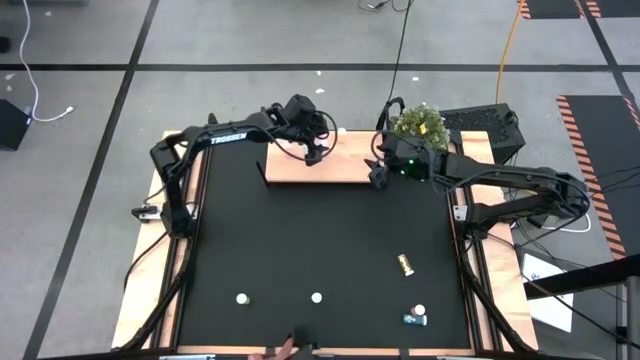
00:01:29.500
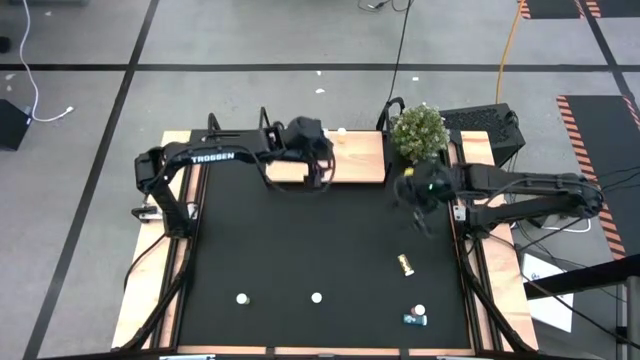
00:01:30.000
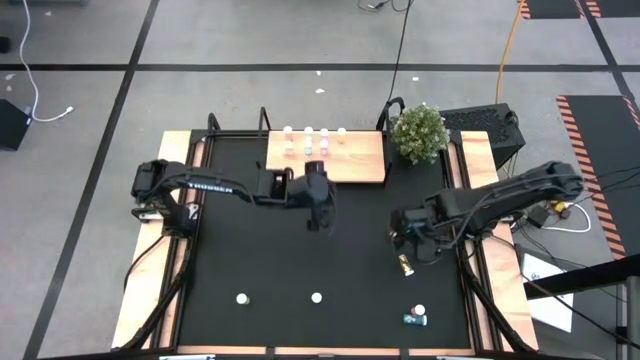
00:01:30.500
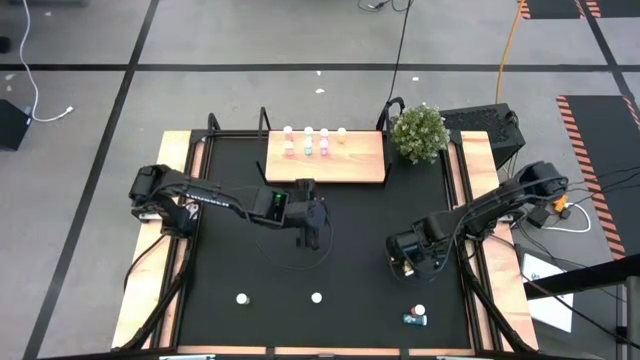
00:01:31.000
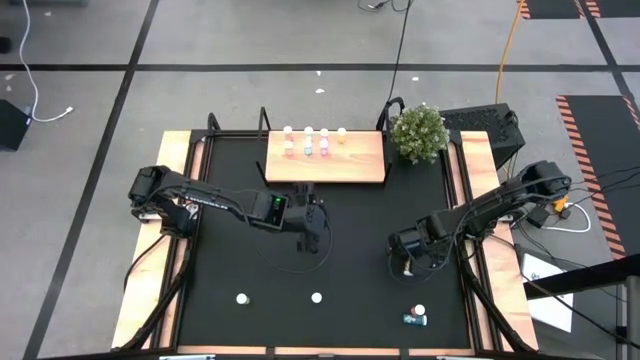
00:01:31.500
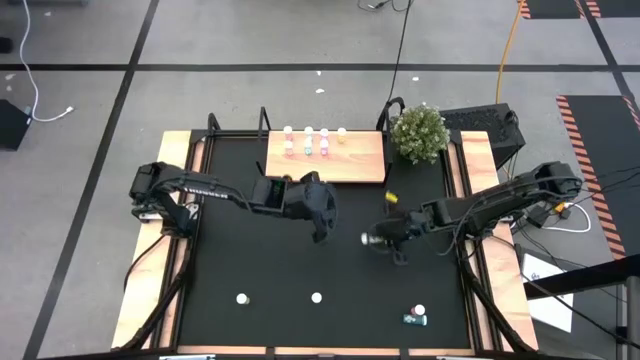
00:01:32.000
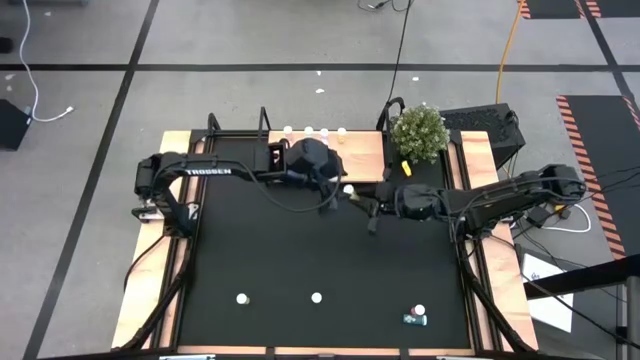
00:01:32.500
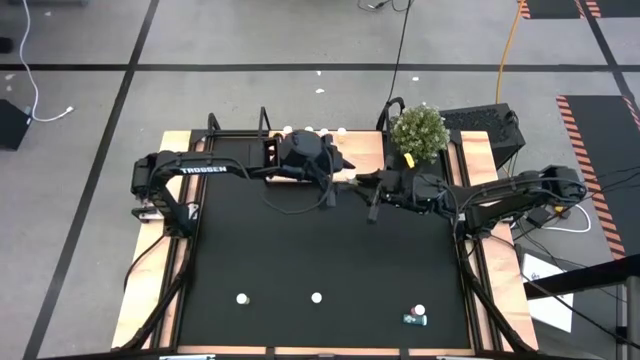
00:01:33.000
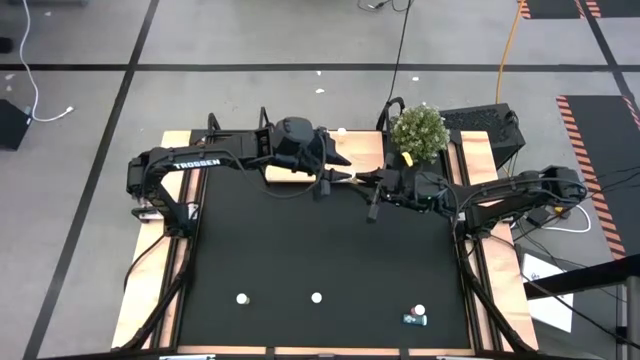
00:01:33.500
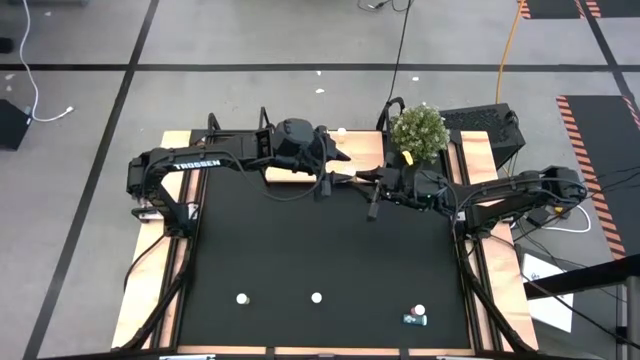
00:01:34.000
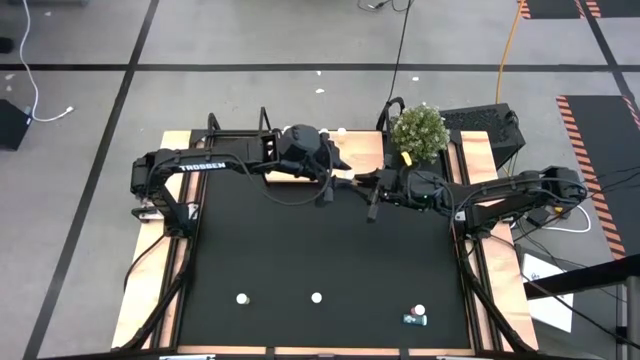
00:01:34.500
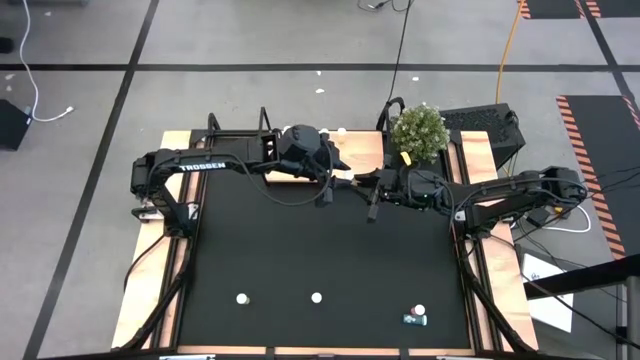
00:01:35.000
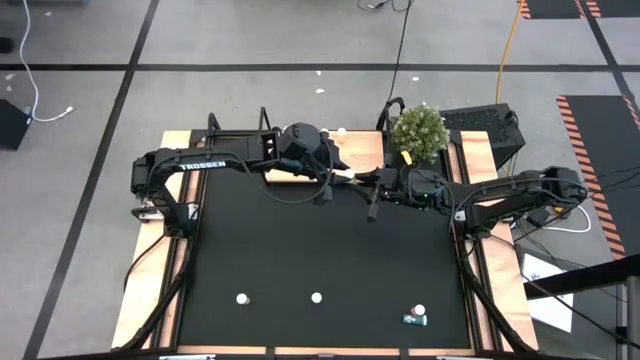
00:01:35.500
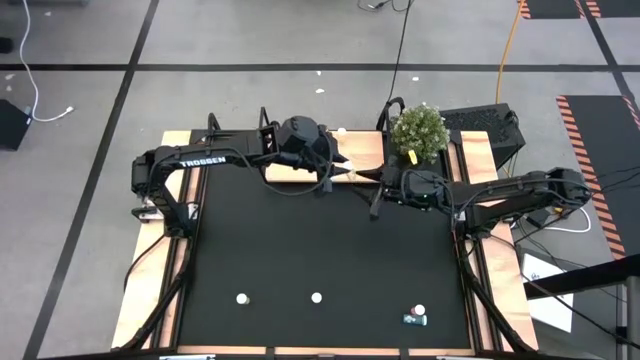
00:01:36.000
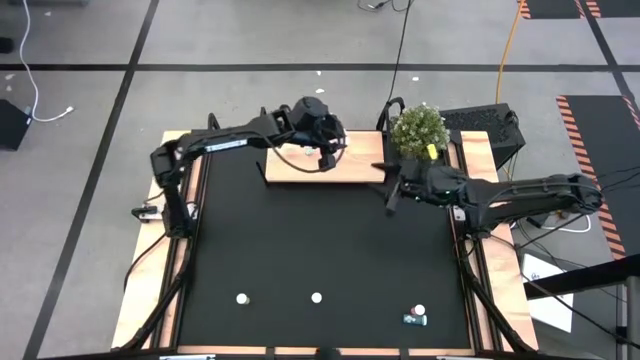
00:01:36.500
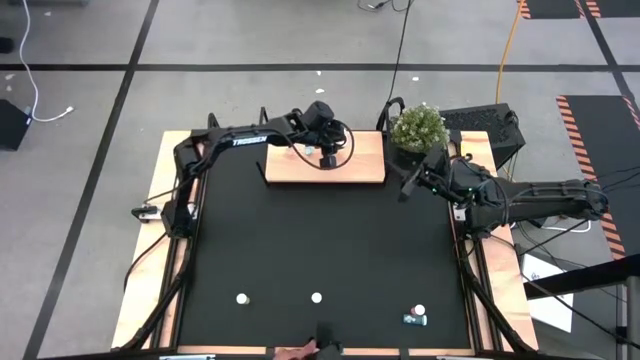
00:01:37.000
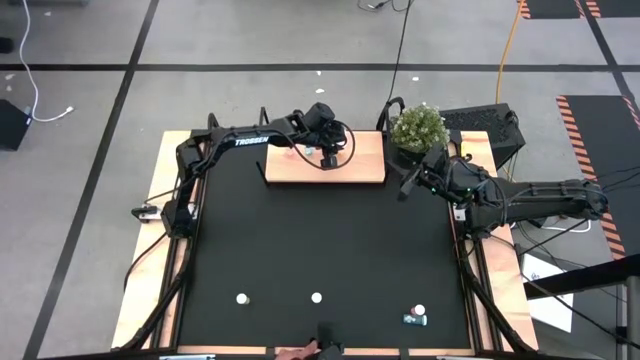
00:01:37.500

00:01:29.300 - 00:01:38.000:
Task: Pick and place medicine bottles onto shelf by color
Put the top yellow pill bottle on the shelf aligned with the other yellow pill bottle

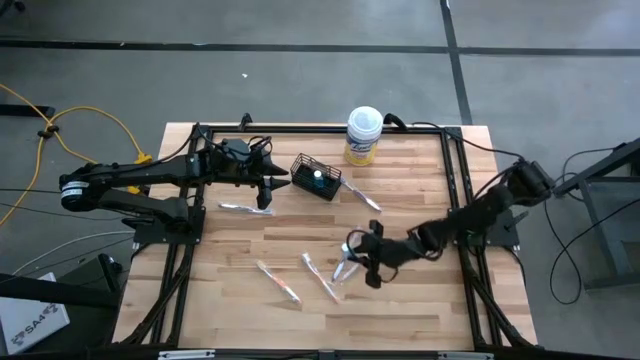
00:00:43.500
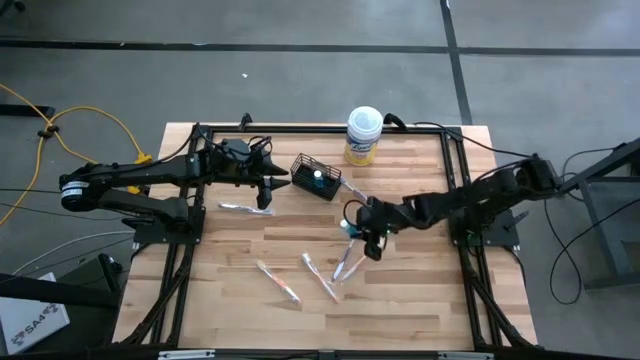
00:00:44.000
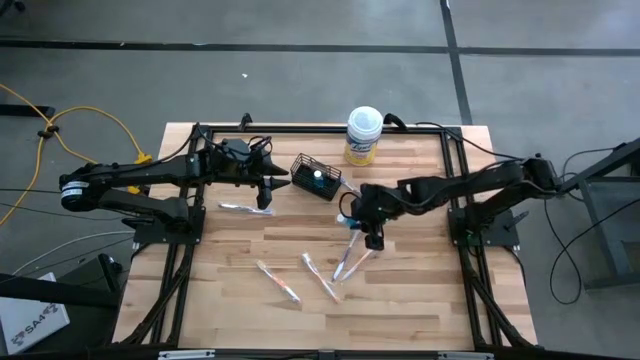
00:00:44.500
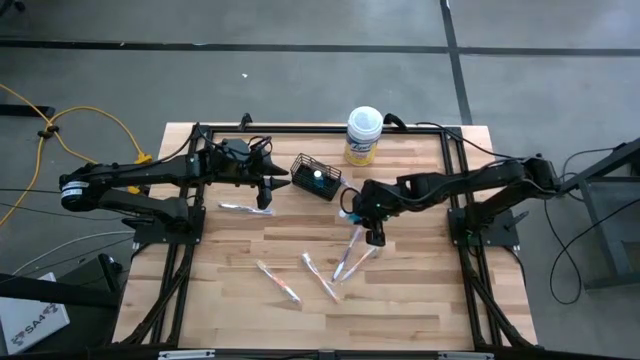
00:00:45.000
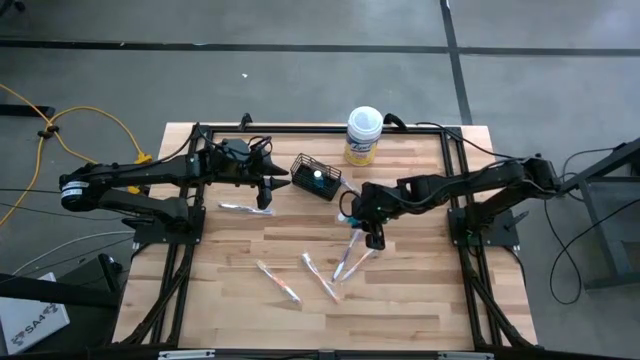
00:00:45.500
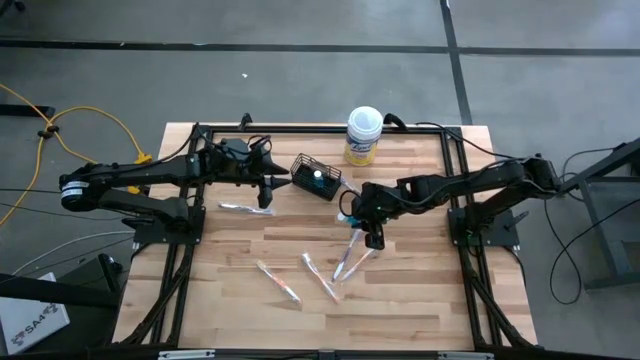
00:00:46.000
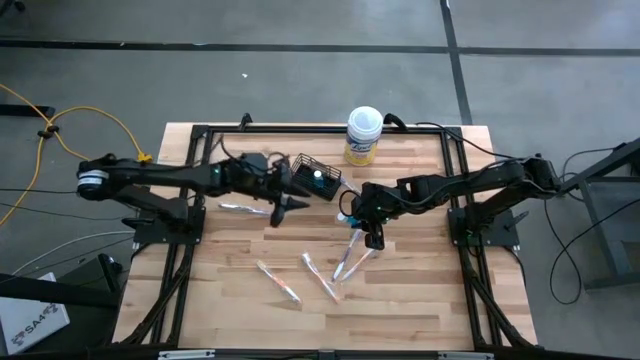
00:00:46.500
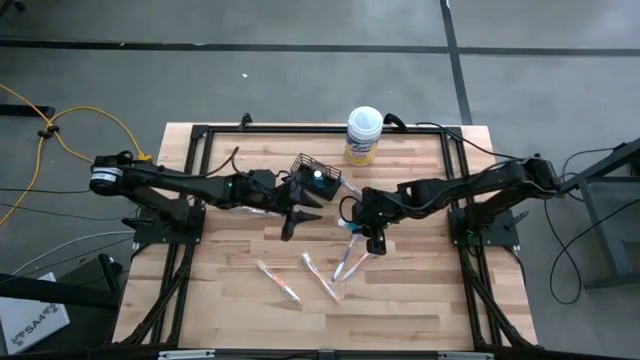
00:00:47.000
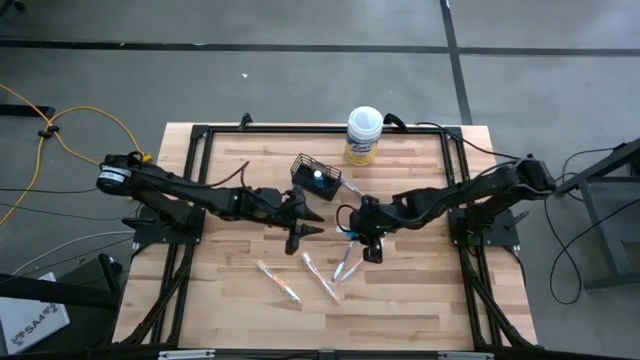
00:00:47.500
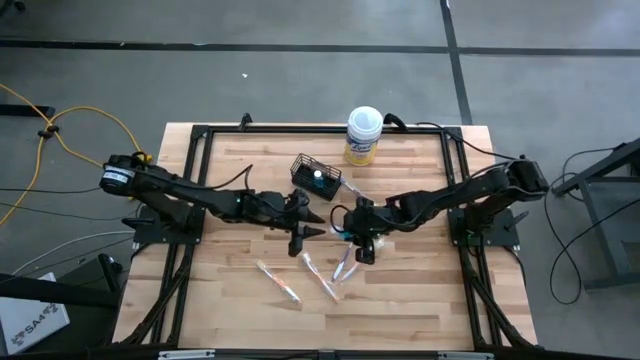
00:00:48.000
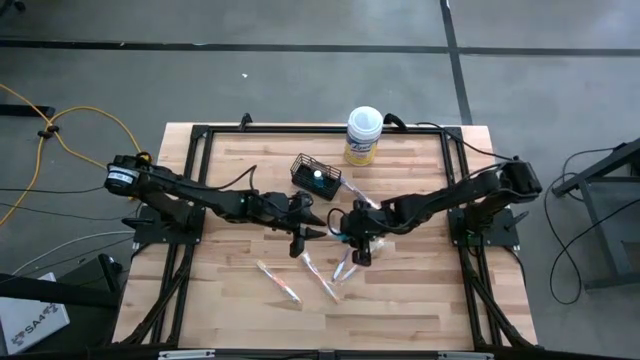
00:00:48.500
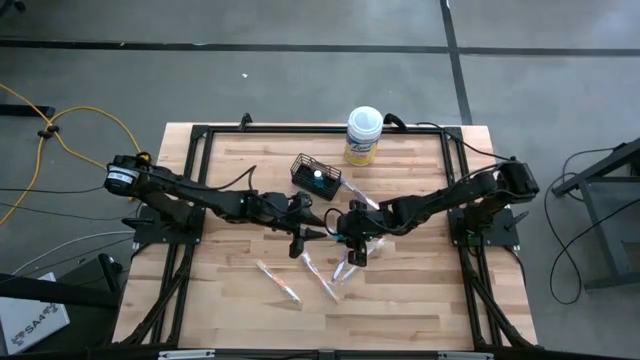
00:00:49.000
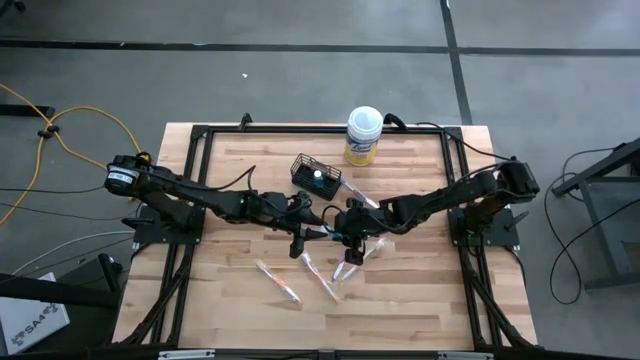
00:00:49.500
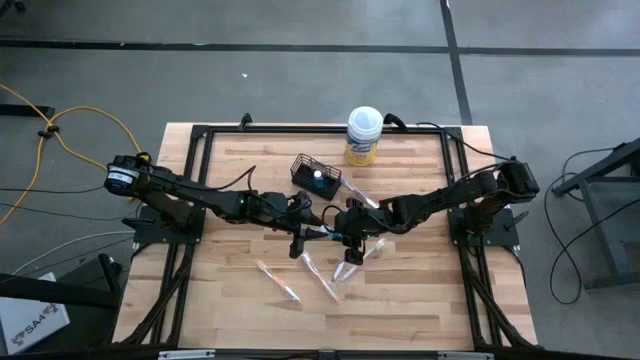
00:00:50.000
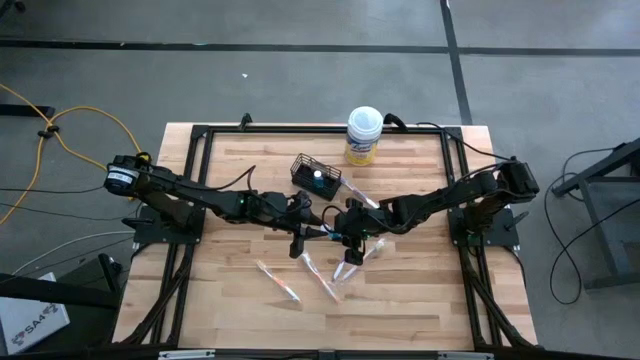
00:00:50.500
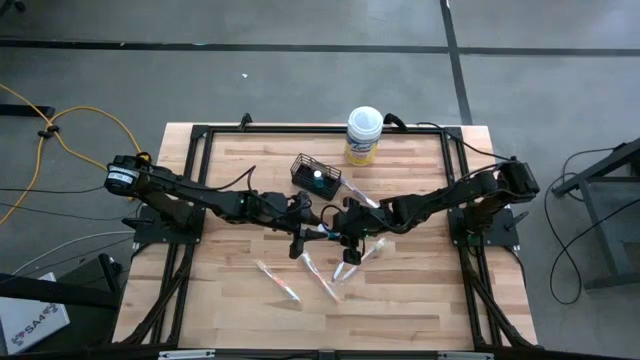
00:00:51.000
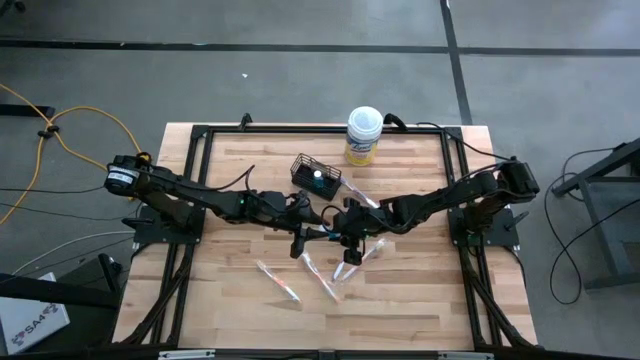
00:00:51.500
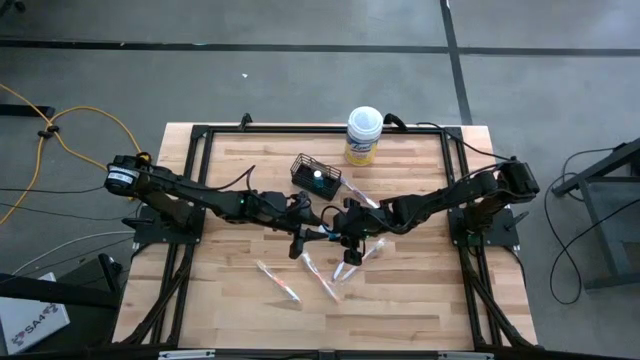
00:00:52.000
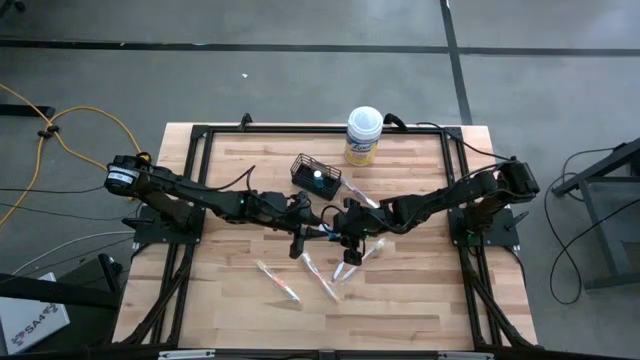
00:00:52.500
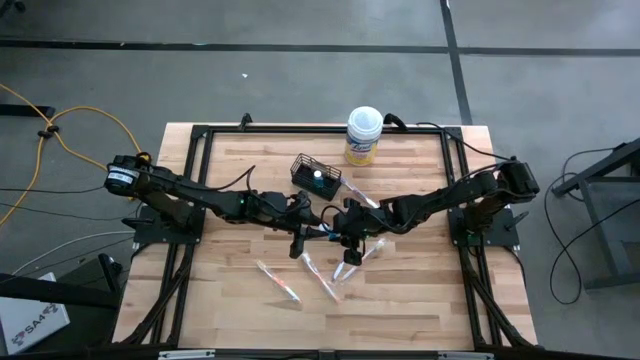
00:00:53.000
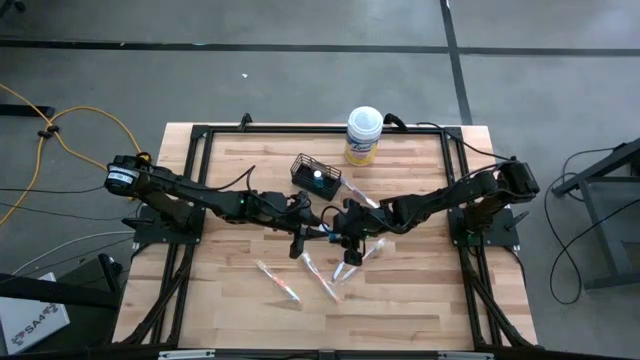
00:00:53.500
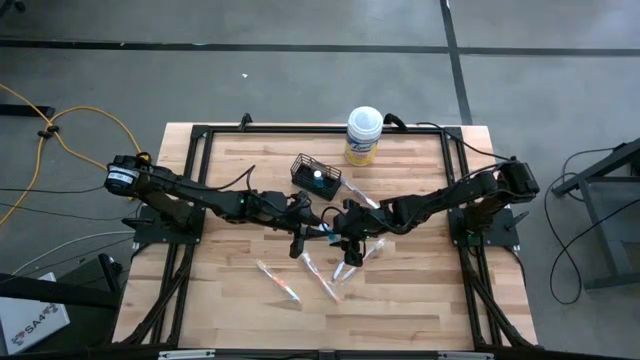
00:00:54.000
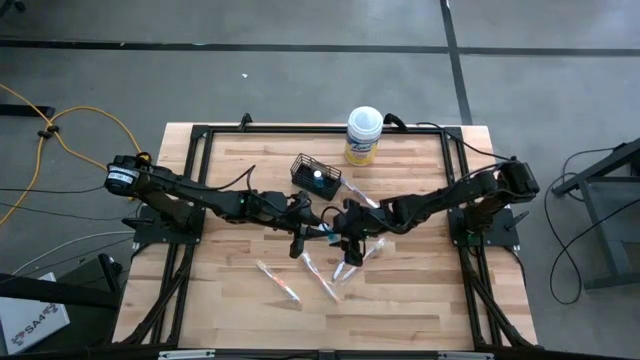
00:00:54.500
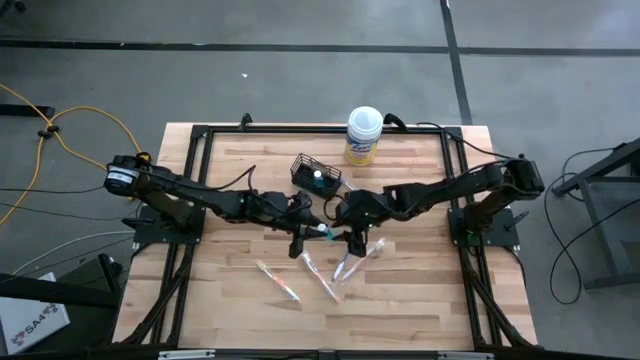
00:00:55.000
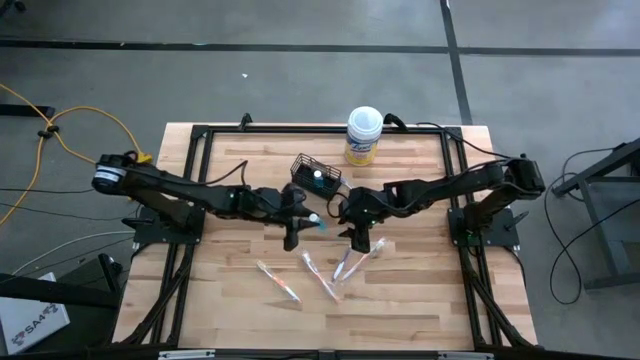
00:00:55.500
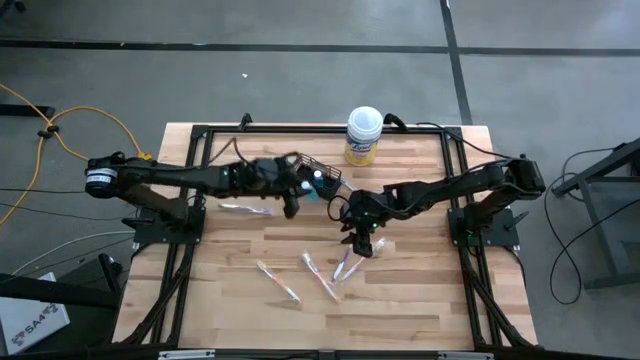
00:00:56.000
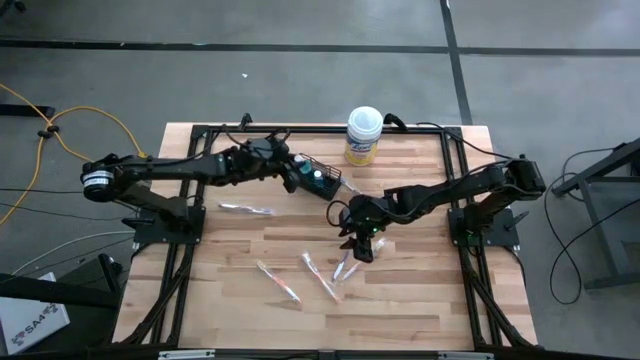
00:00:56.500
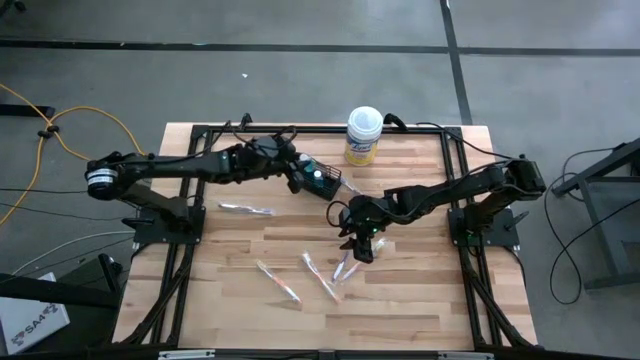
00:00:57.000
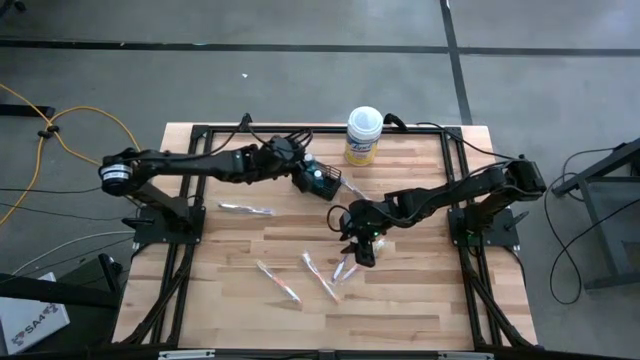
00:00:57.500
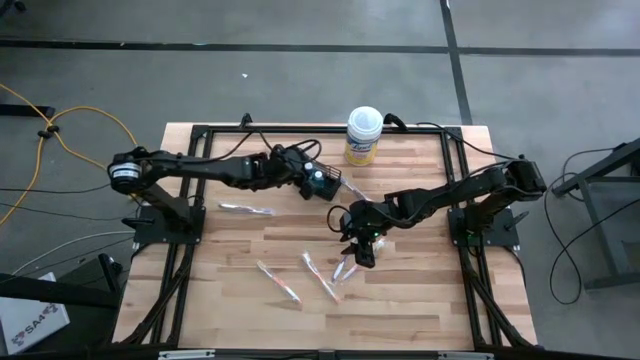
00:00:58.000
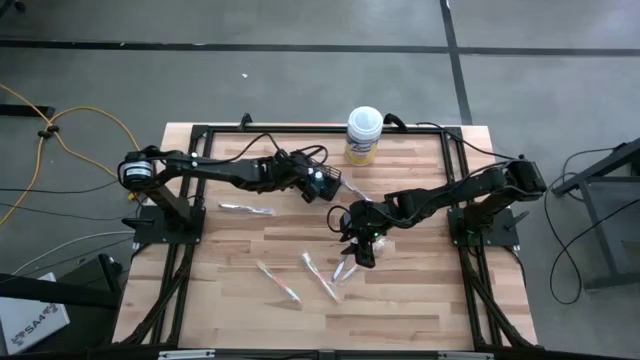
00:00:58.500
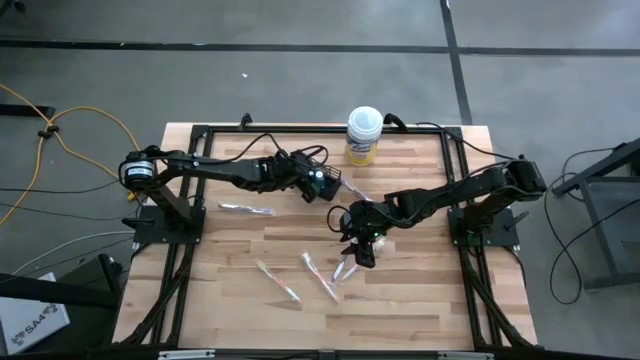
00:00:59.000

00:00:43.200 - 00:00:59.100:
Task: Pick & Place toothbrushing station
Put the blue mouthwash into the black mesh organizer
